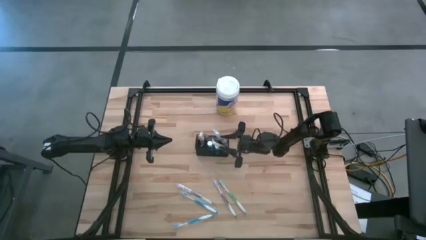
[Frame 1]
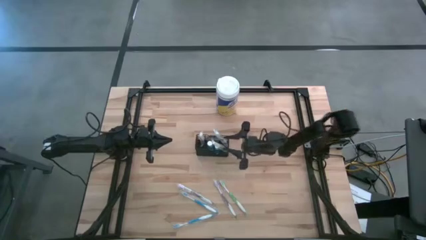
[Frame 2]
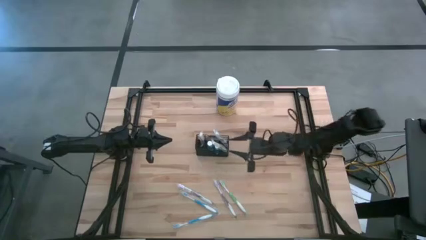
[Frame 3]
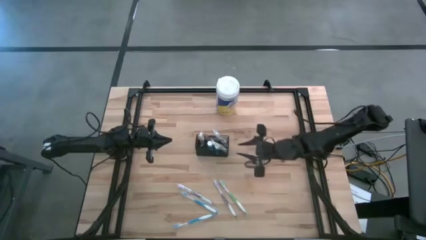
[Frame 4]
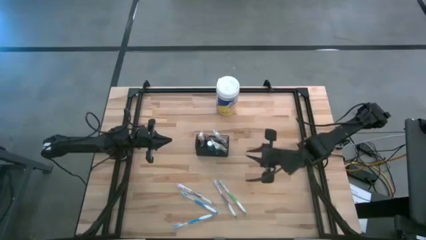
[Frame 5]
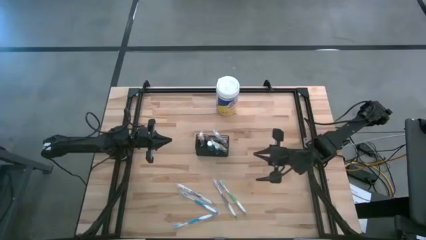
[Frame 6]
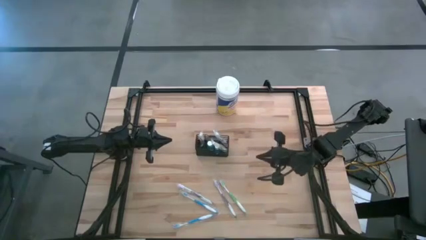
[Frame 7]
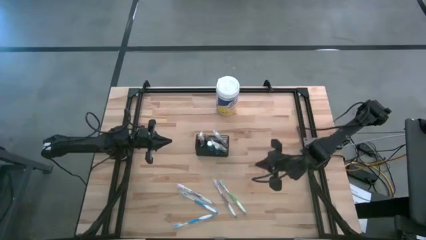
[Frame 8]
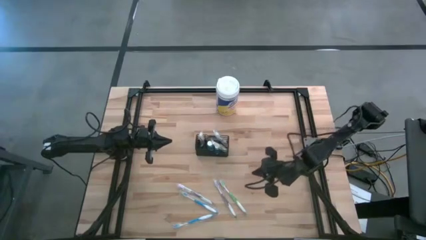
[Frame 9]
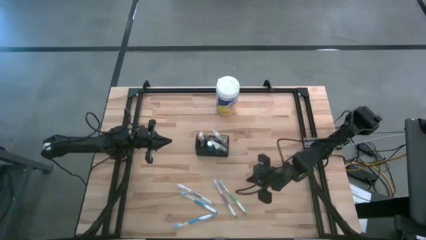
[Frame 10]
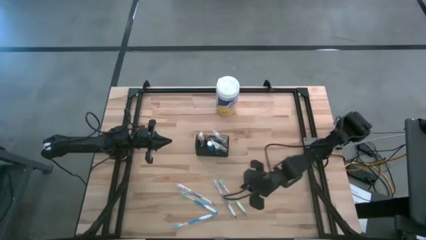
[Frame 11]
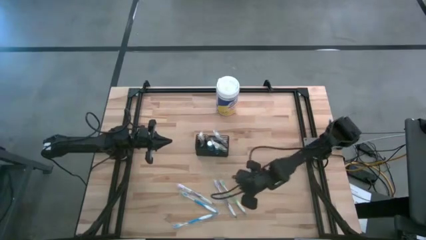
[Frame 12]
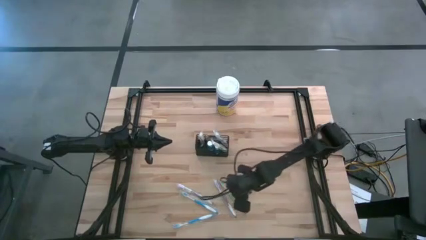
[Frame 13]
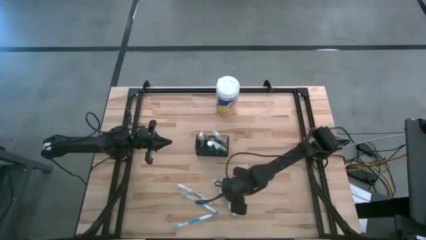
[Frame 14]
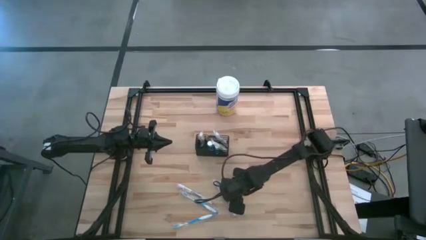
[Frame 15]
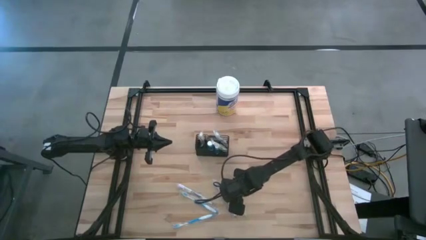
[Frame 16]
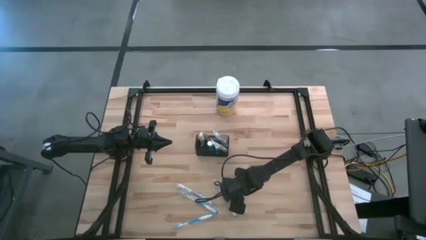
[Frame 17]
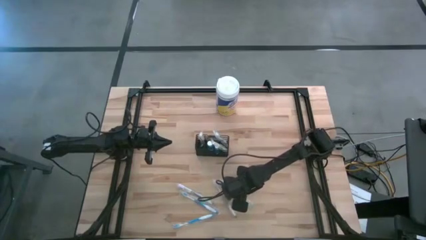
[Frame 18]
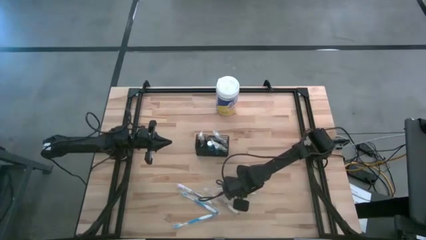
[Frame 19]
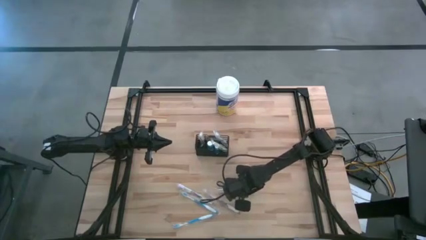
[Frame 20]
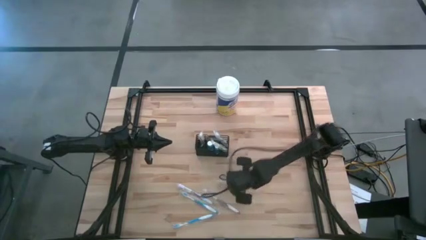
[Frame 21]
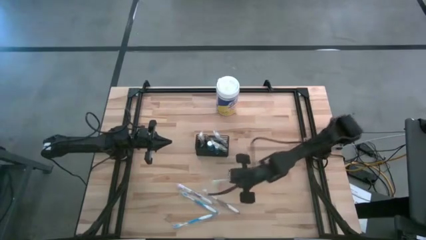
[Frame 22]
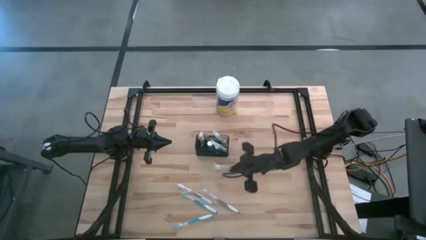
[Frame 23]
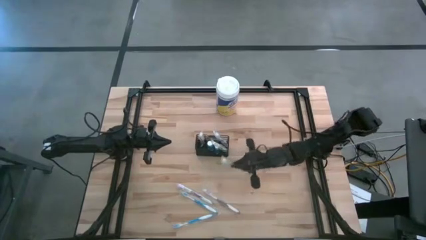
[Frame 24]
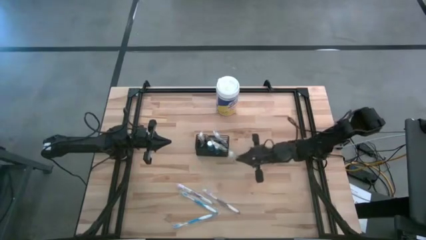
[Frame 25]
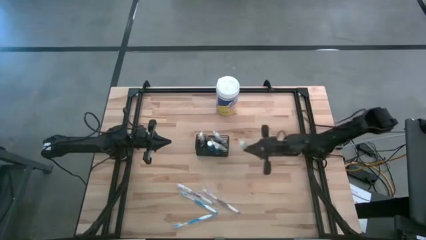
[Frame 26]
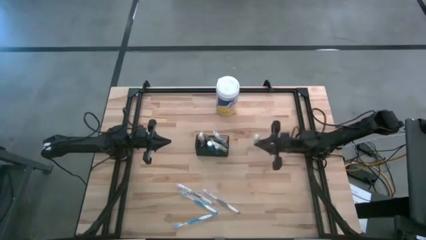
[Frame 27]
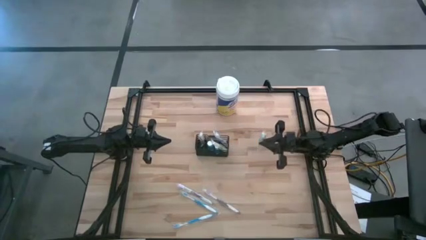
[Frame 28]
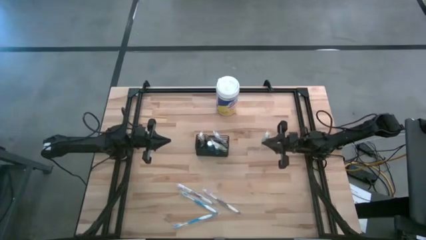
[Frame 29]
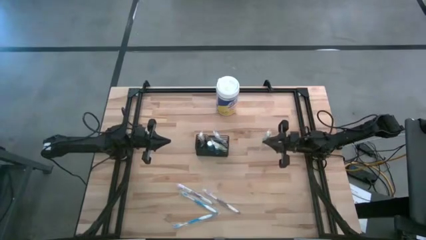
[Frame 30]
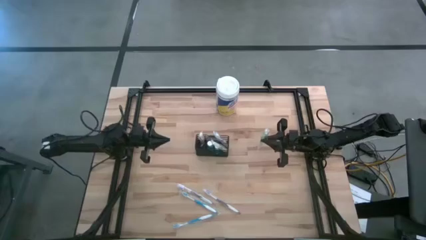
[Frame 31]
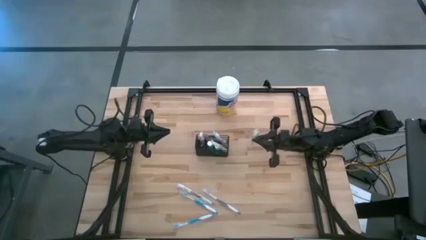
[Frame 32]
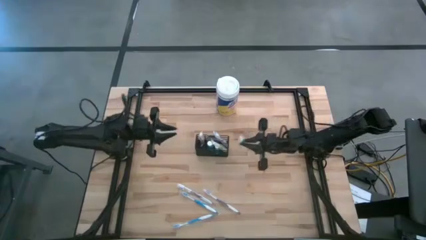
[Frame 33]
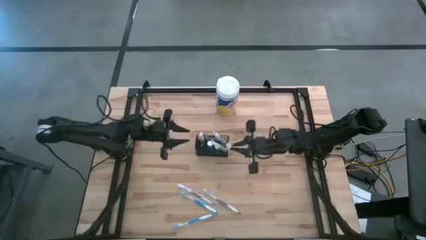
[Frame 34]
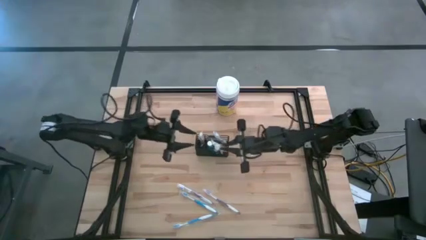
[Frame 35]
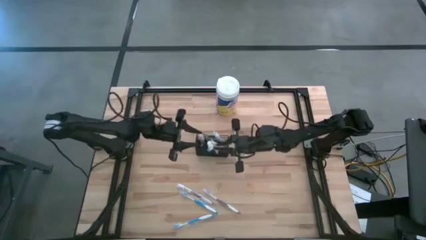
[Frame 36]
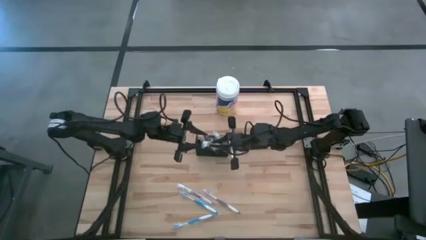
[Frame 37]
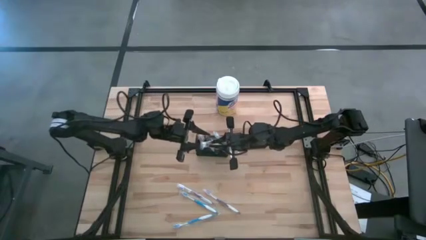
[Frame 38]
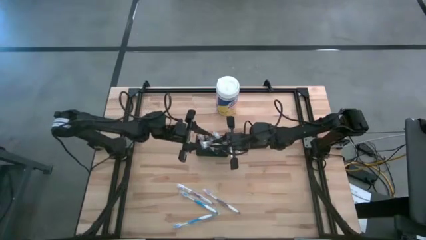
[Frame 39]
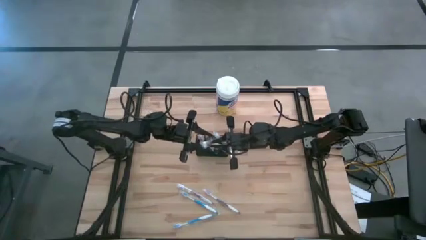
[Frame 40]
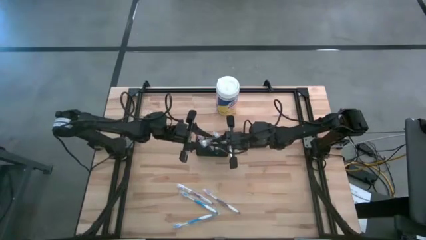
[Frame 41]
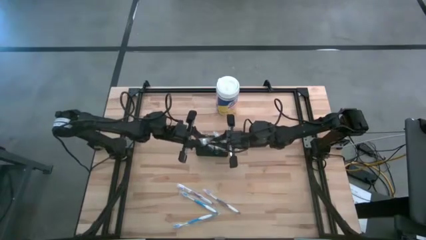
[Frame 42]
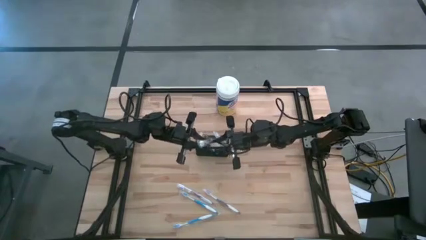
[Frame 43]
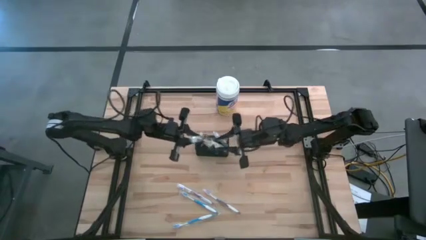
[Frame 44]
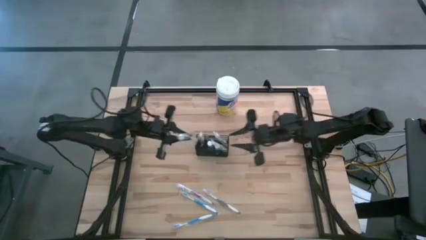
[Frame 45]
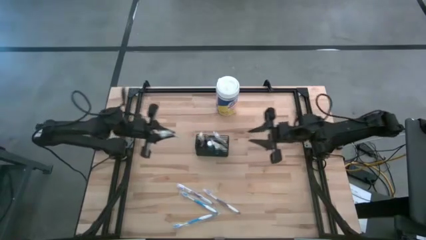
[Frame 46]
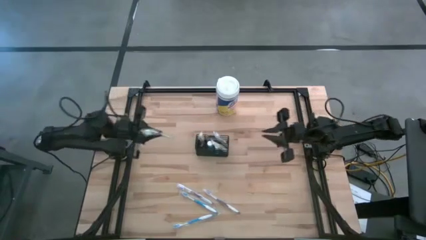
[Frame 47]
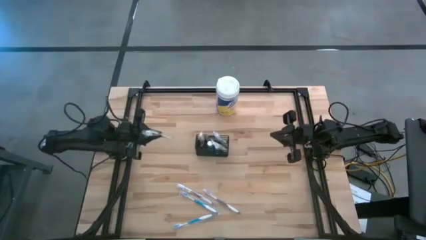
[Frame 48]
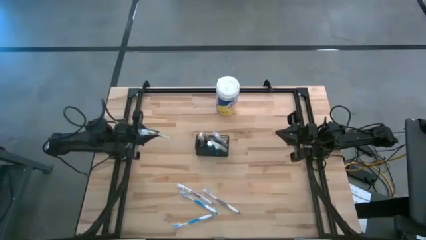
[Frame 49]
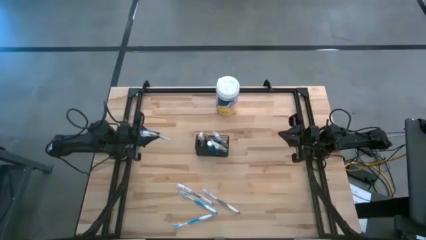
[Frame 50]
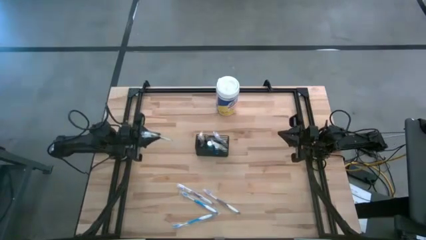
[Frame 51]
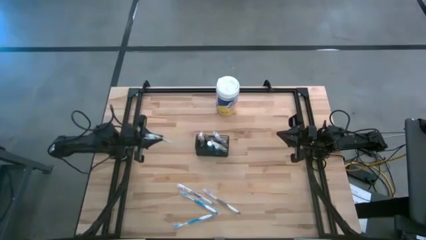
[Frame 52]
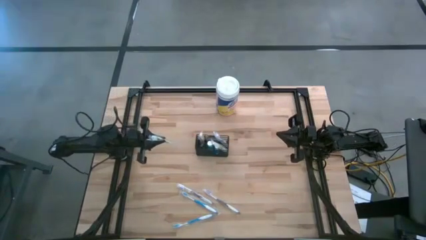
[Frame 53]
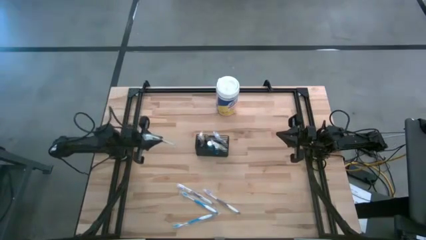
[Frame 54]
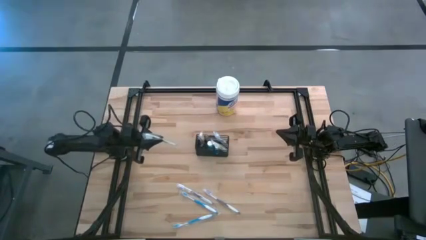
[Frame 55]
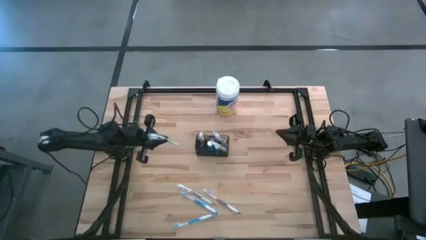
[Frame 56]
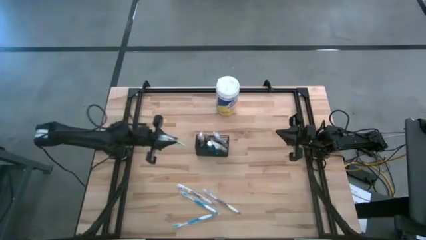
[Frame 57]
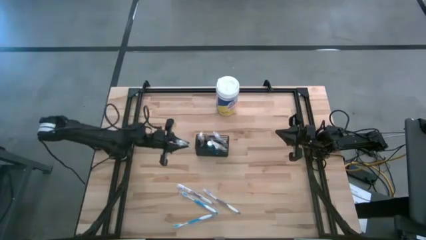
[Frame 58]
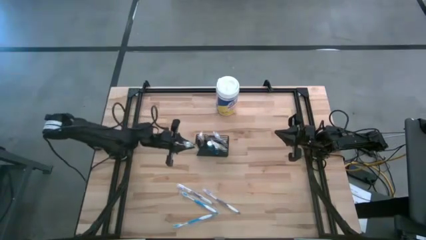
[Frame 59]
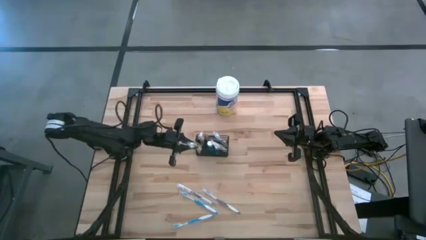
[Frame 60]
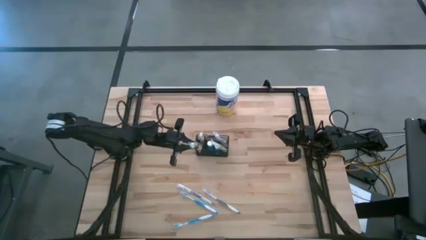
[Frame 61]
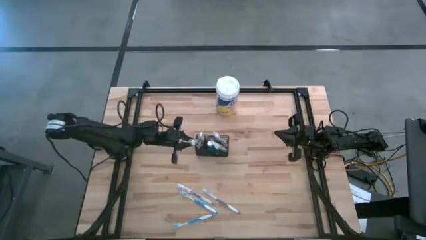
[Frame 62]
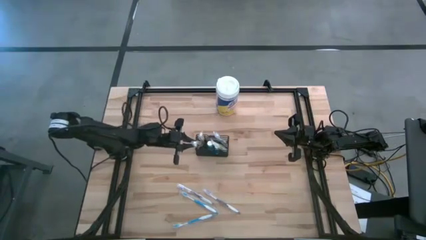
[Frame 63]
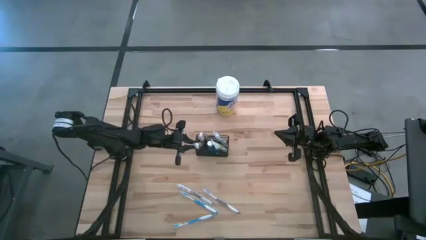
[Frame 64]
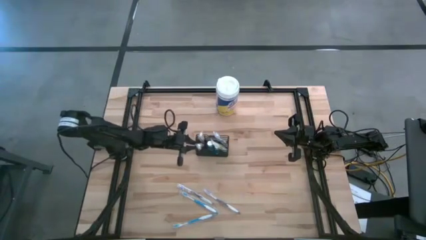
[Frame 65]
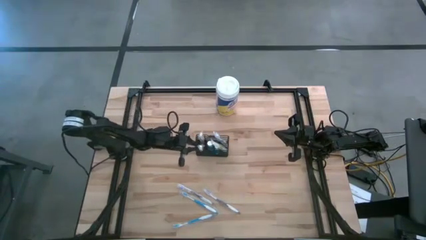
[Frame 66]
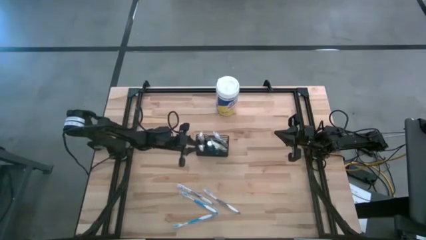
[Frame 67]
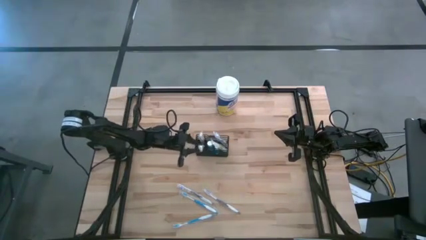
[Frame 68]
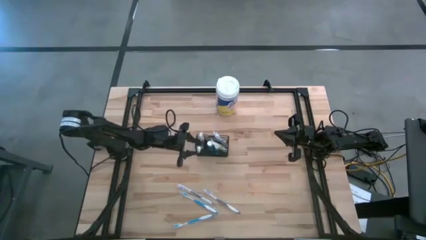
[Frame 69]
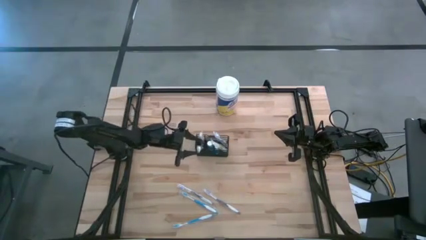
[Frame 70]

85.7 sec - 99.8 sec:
Task: Pick & Place toothbrushing station
Put the green toothbrush into the black wire organizer

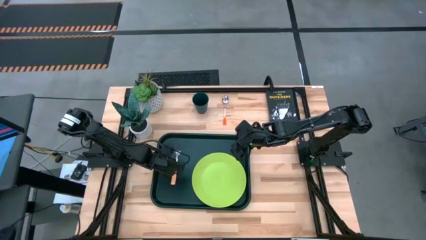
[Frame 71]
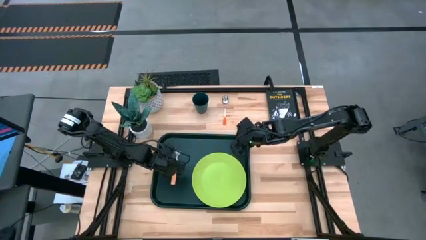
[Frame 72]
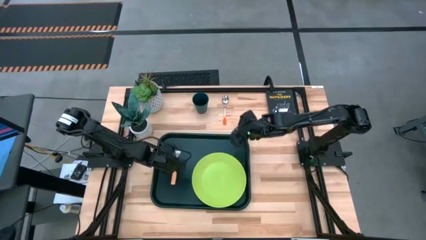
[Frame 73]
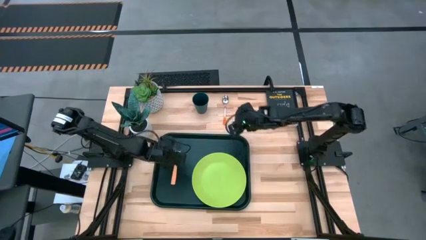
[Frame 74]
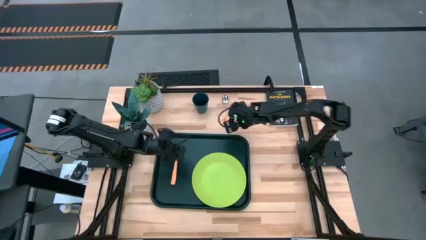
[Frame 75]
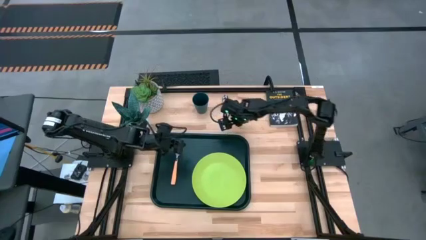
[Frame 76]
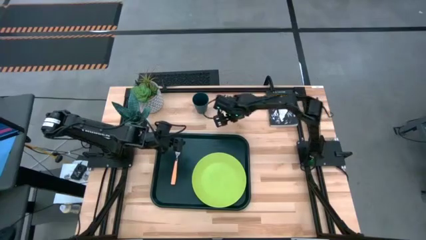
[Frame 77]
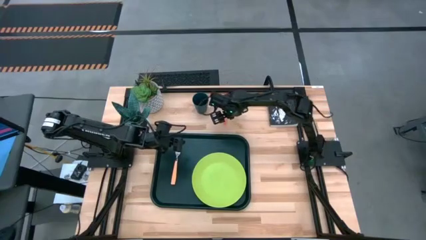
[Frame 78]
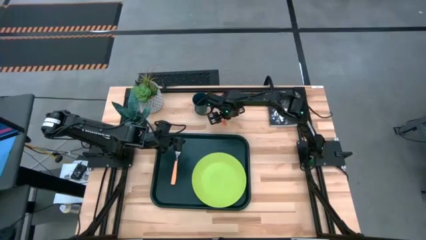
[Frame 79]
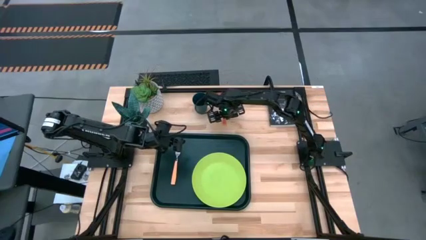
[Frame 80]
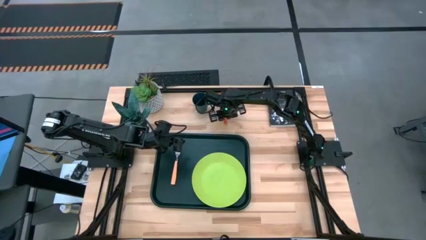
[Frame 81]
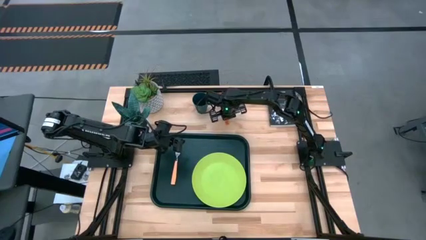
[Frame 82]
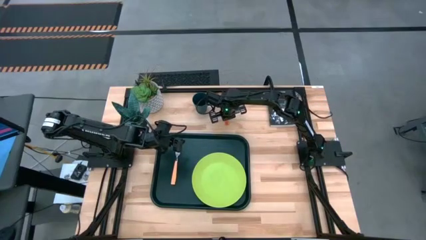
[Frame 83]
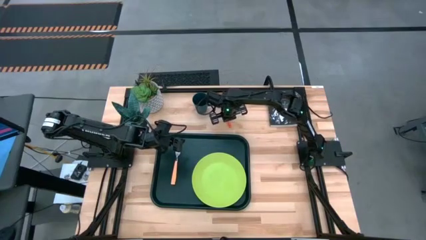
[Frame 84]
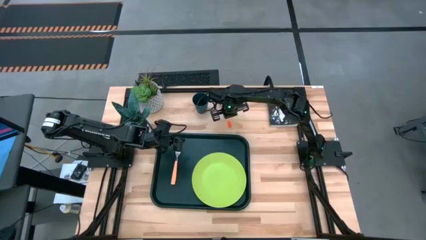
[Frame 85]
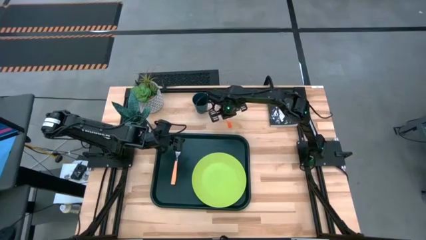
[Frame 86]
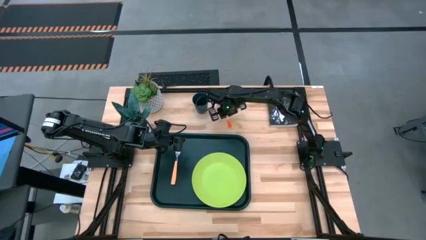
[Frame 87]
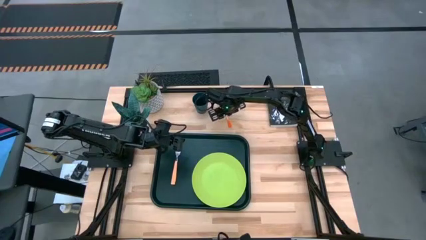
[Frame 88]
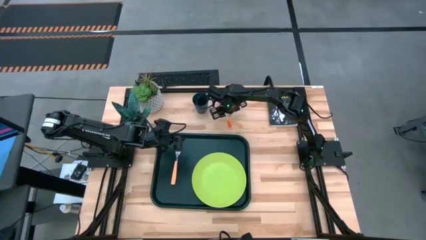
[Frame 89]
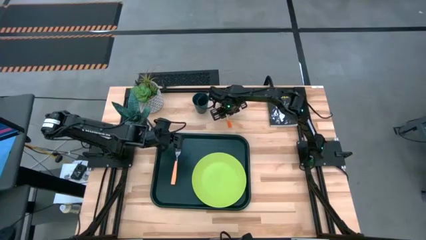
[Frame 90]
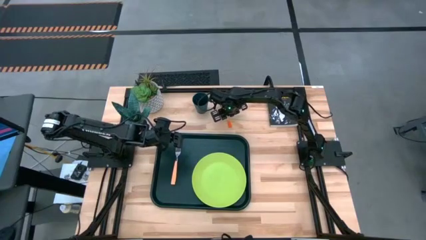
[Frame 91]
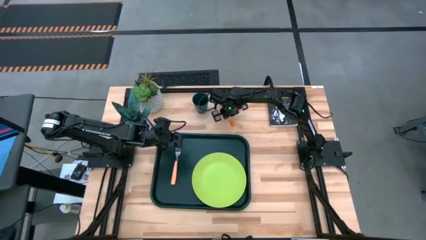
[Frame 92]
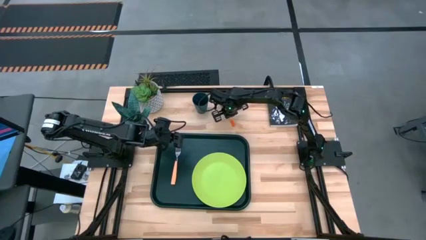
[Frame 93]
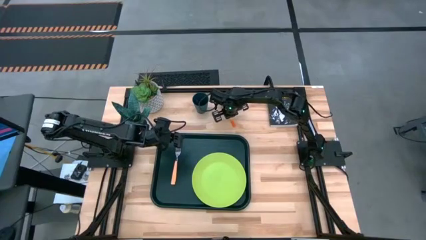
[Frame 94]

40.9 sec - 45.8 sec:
Task: Pick and place plate/cup/fork/spoon on tray
Put the orange spoon on the black tray to the left of the green plate
